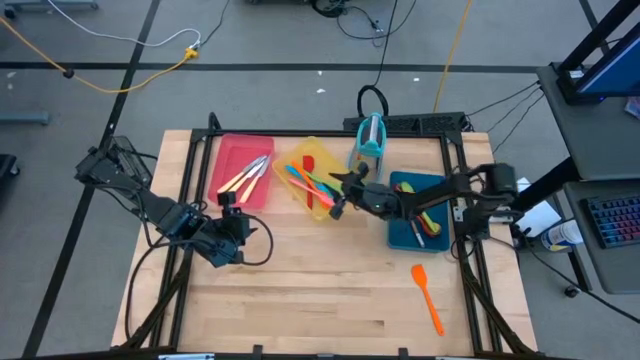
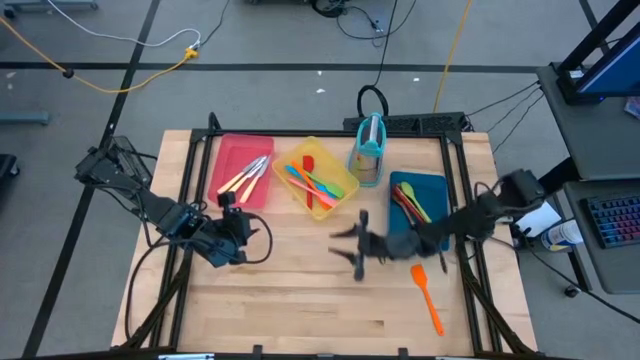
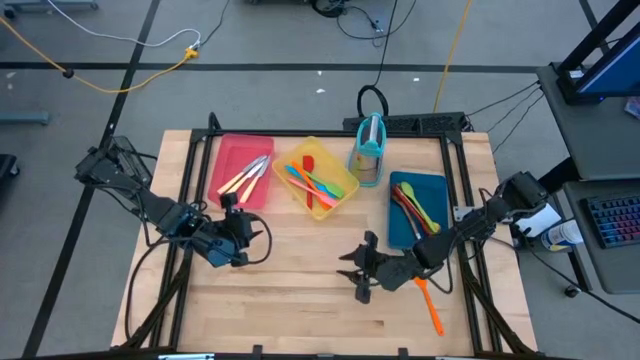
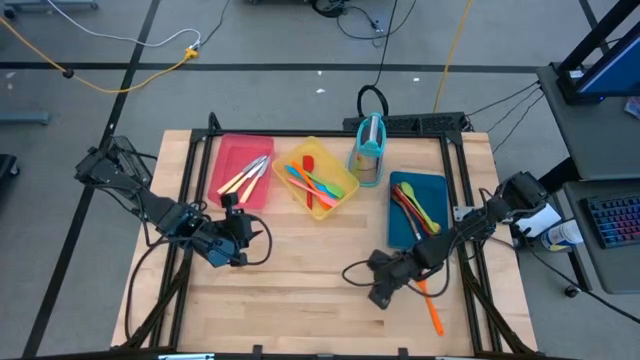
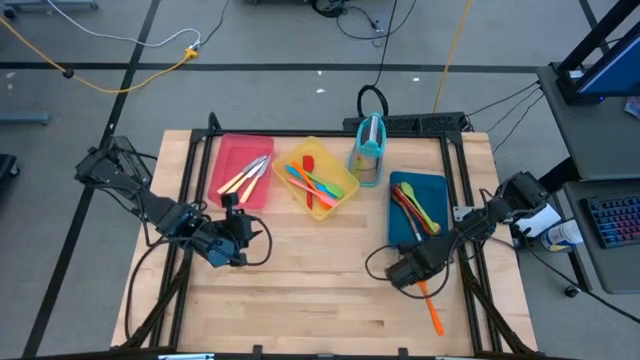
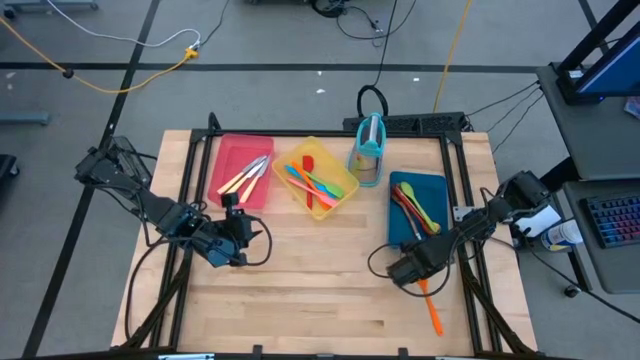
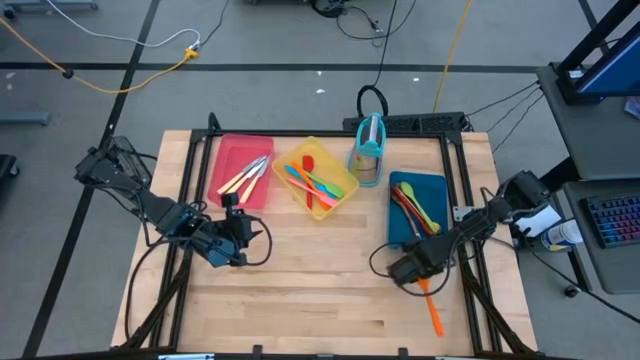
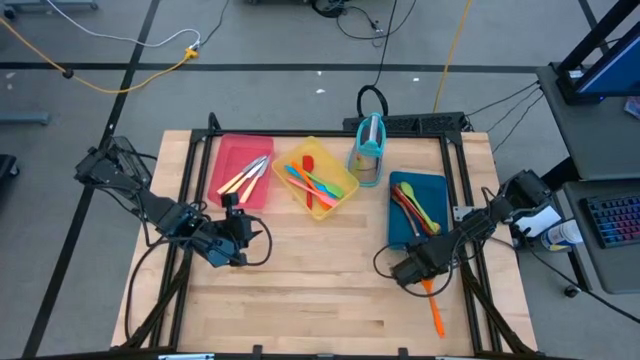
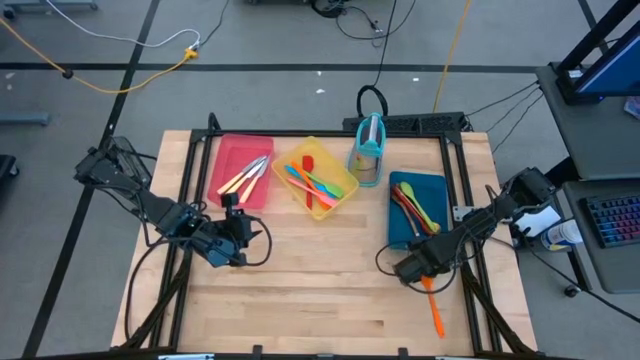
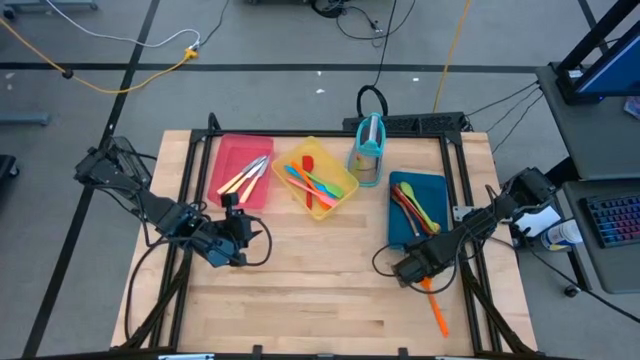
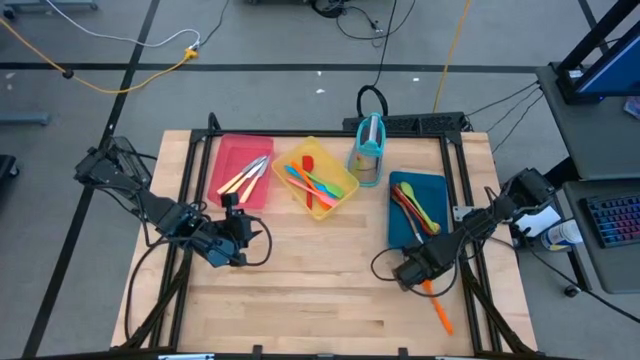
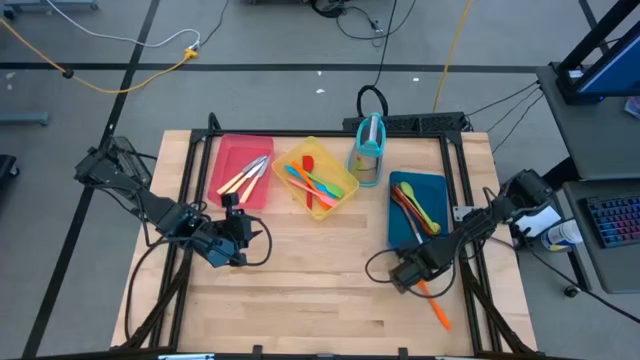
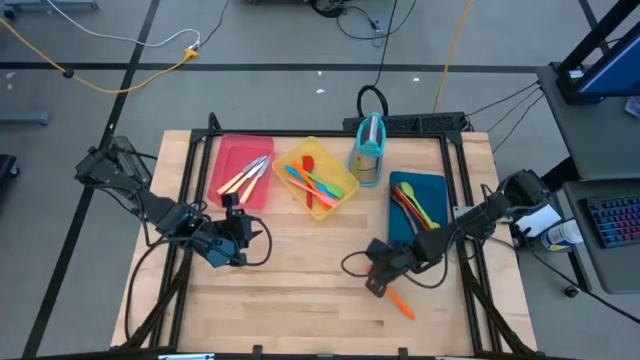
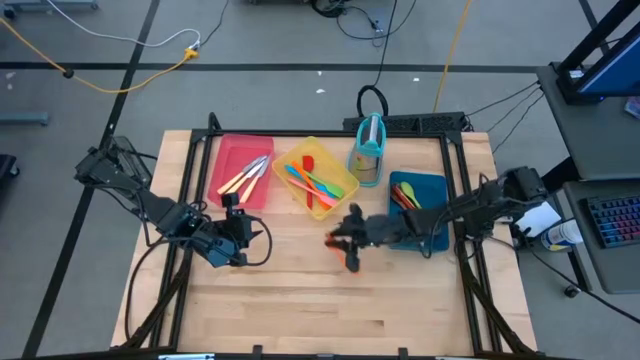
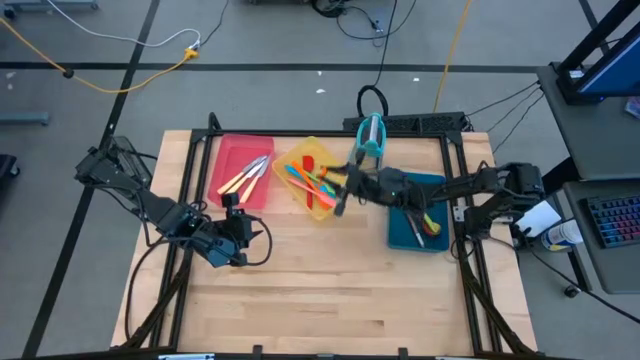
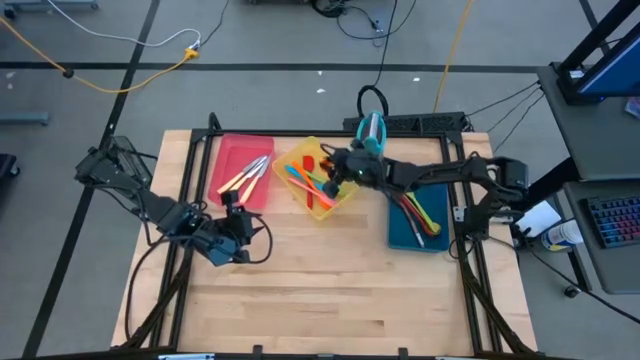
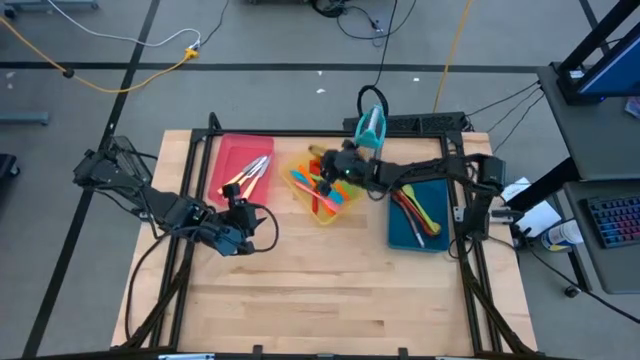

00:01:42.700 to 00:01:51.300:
Task: Pick & Place Kitchen Items
Put the orange spatula into the yellow bin

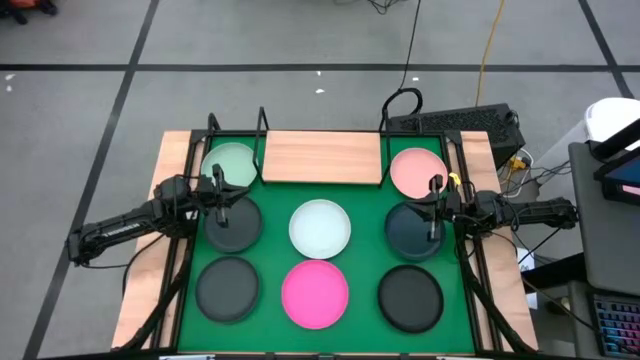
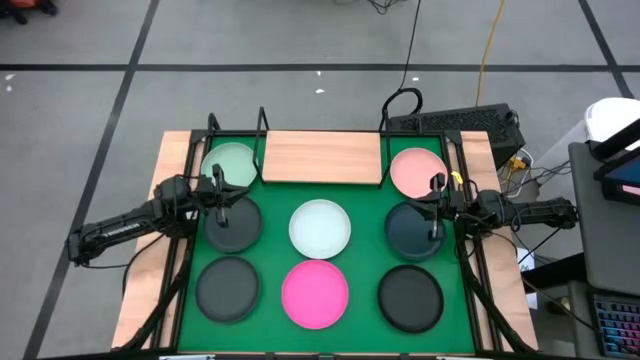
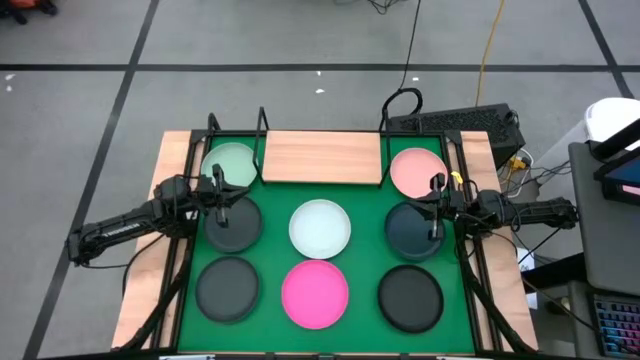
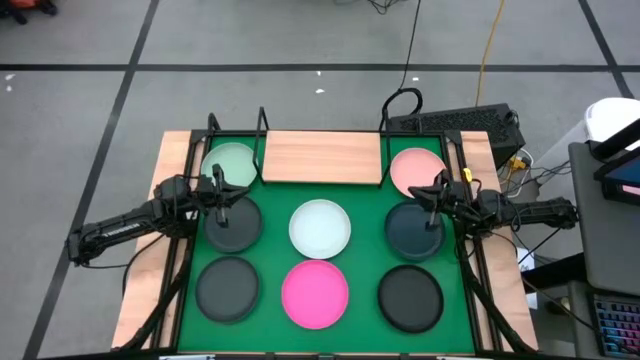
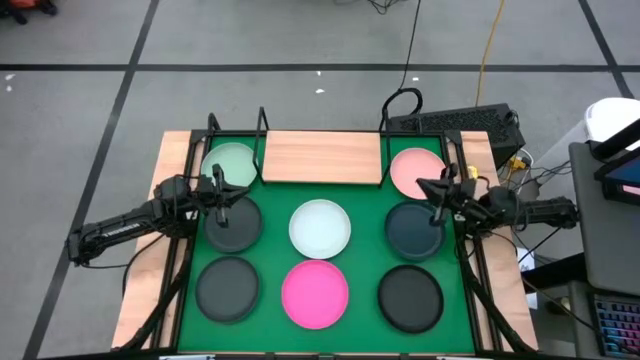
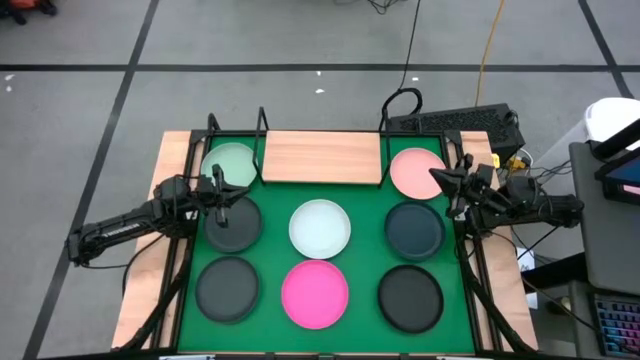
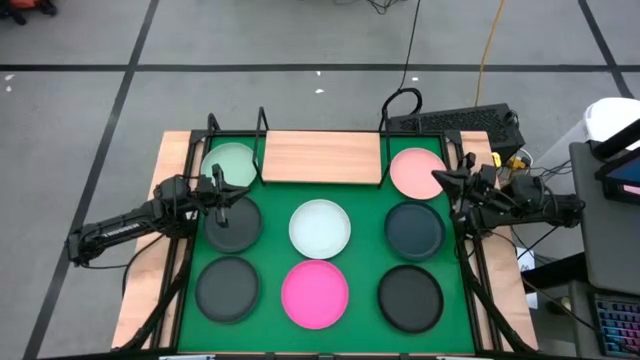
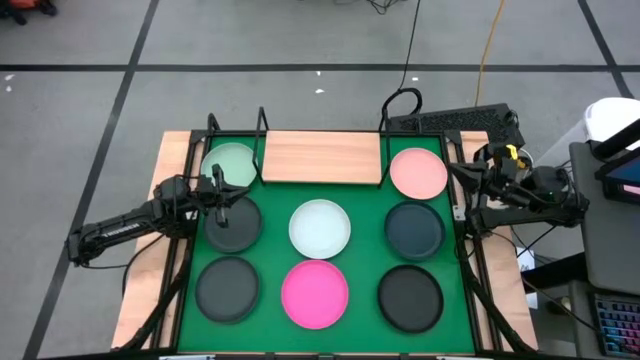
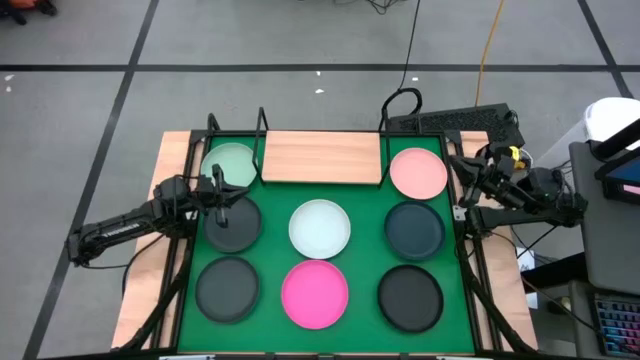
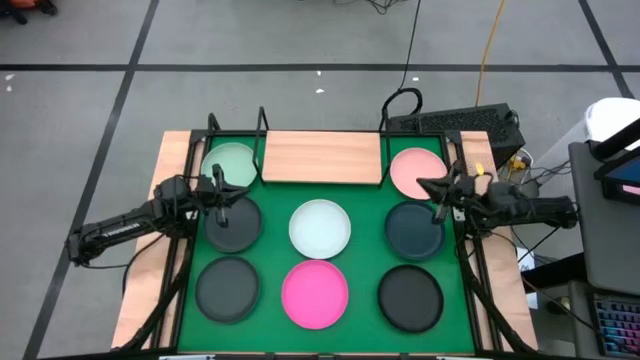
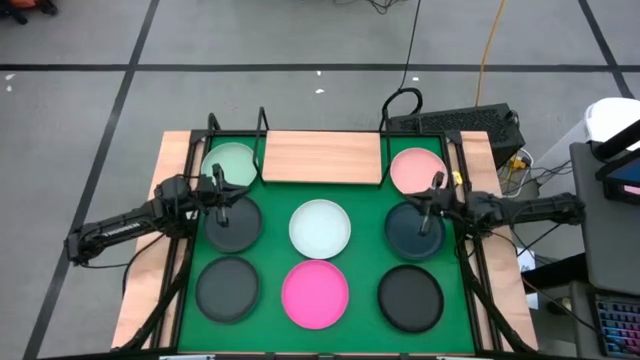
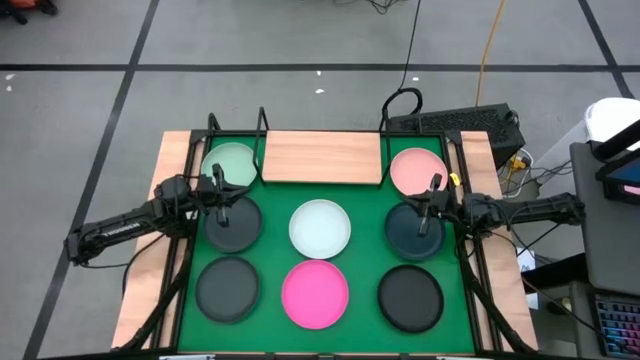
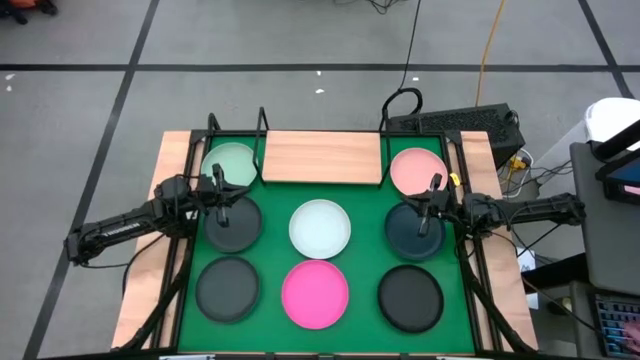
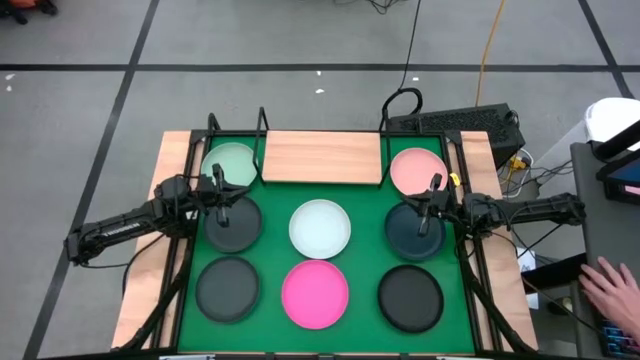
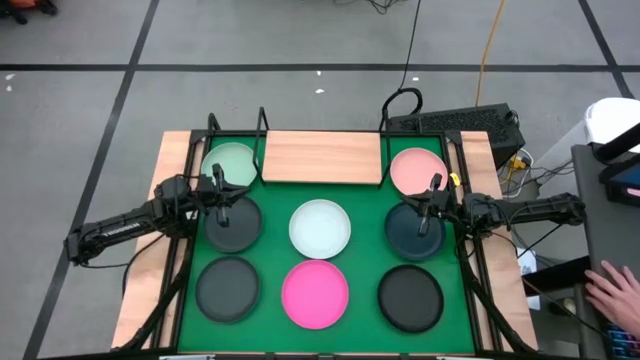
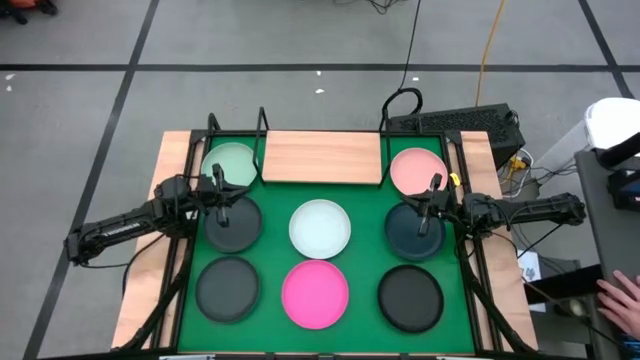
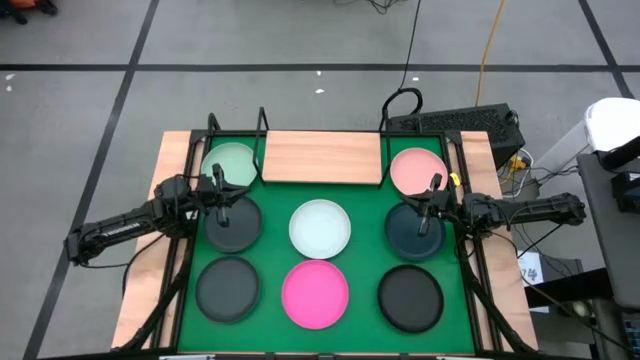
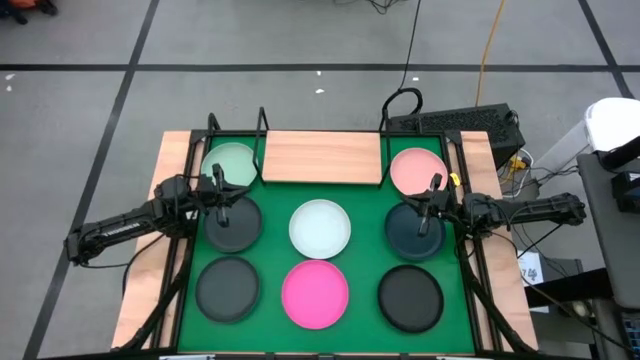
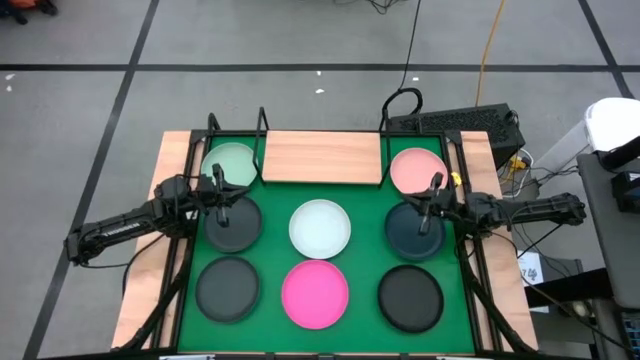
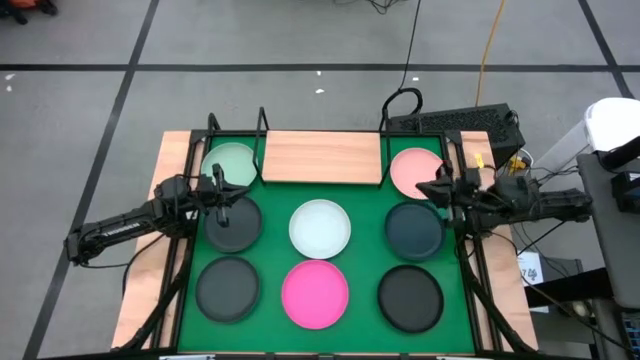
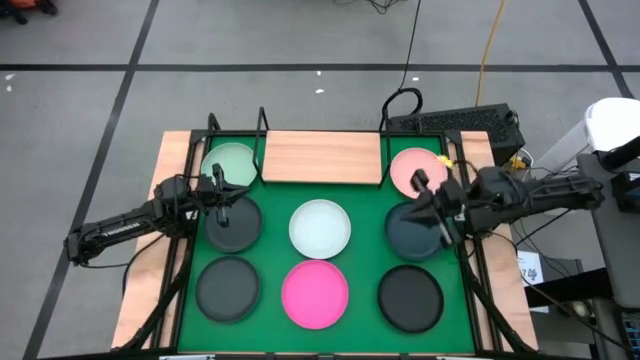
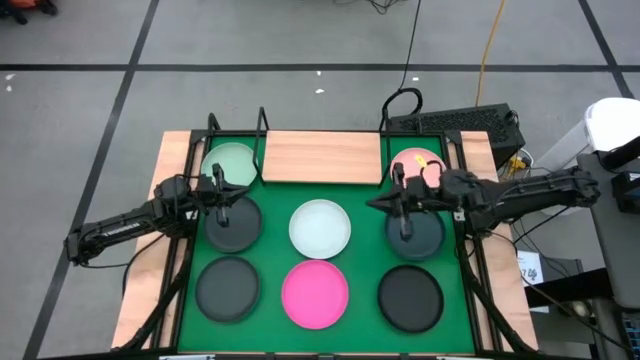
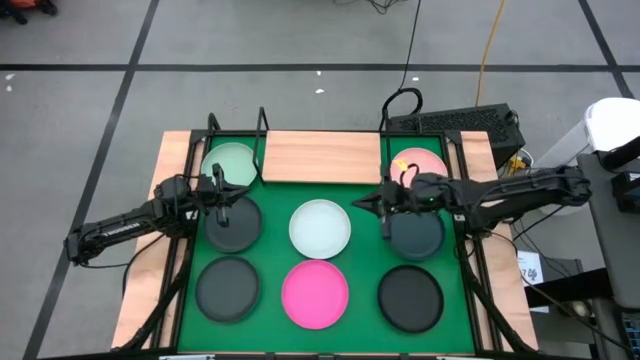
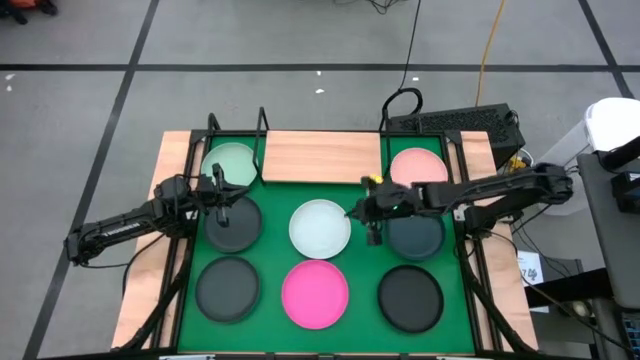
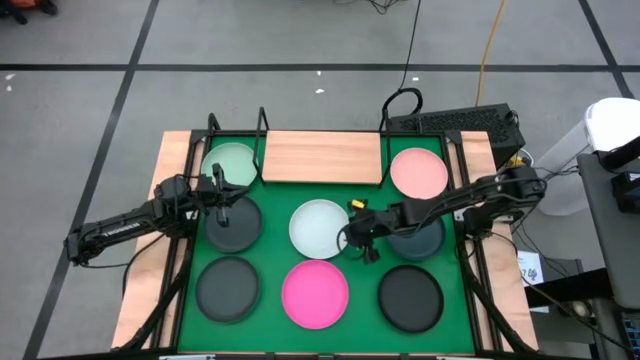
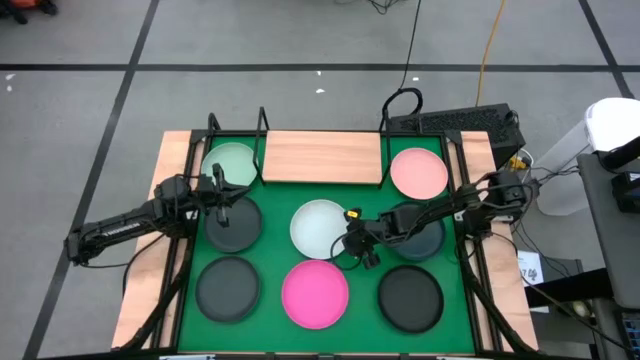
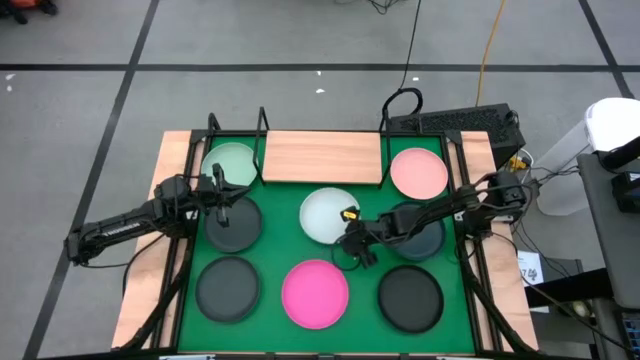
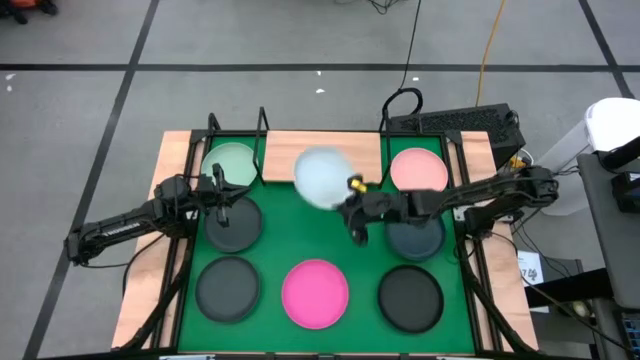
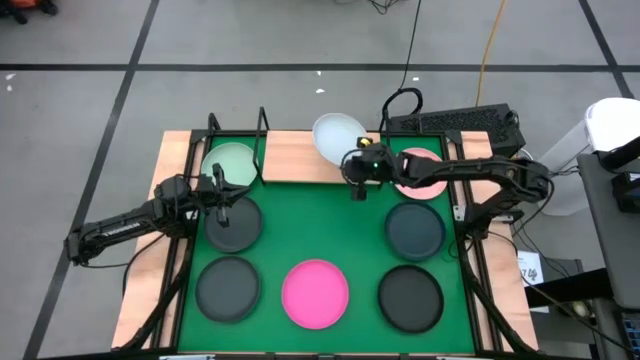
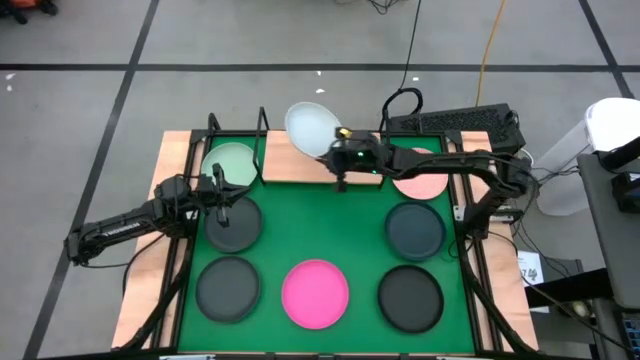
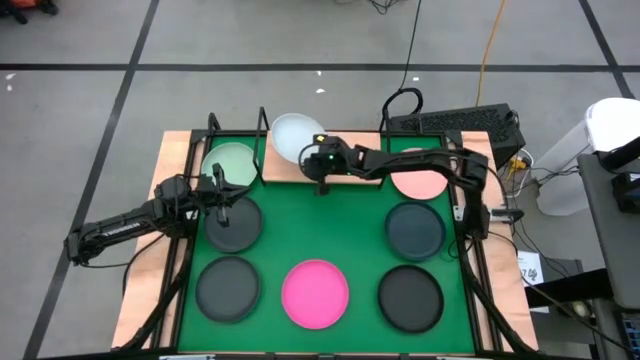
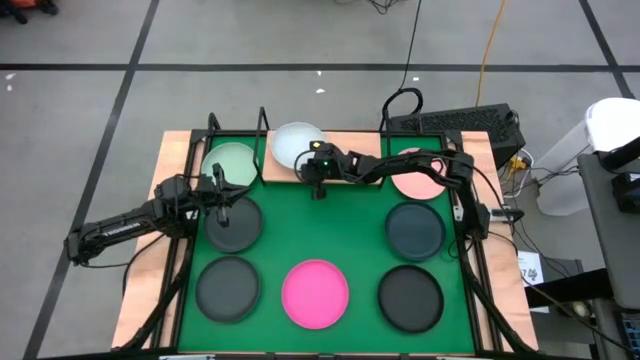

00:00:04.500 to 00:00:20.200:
Task: Place and stack plates onto a shelf
Put the white plate on the shelf
